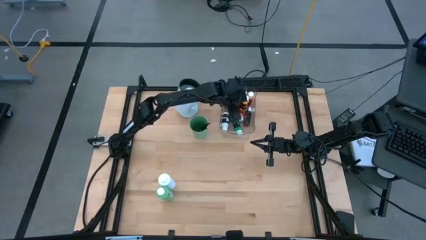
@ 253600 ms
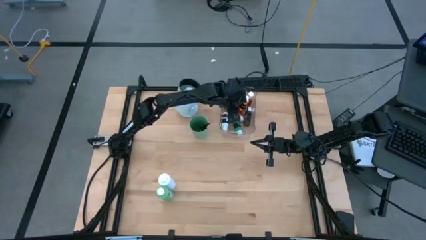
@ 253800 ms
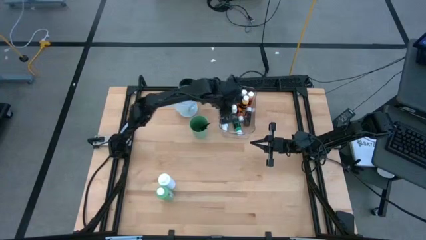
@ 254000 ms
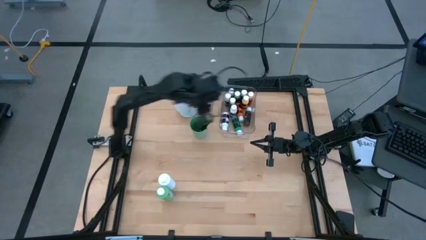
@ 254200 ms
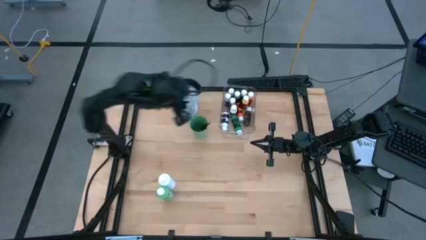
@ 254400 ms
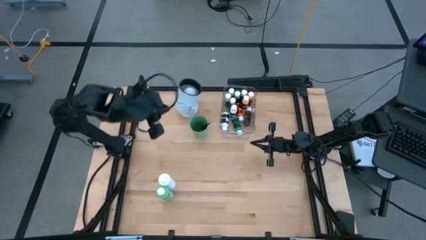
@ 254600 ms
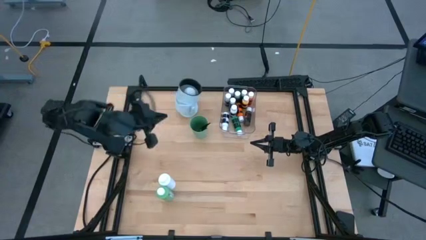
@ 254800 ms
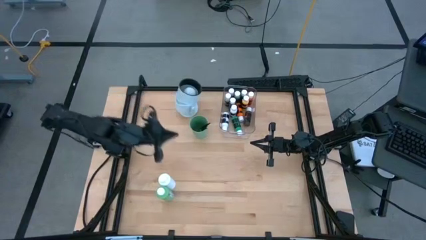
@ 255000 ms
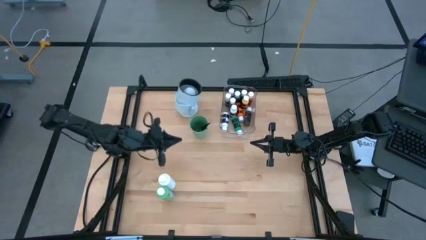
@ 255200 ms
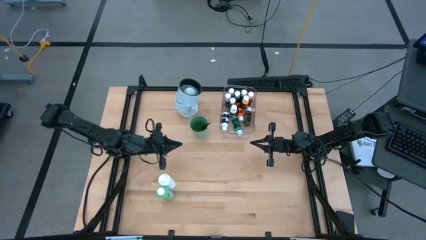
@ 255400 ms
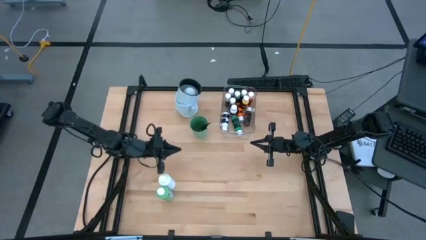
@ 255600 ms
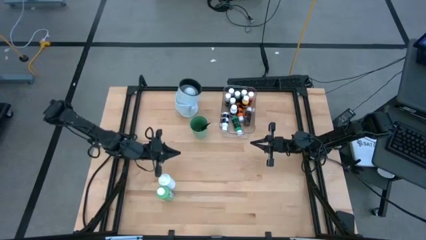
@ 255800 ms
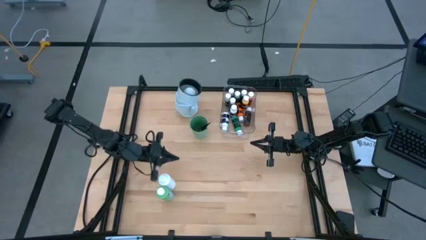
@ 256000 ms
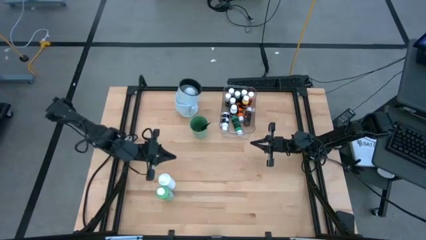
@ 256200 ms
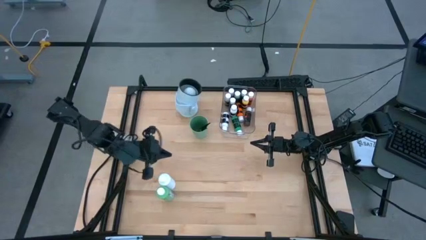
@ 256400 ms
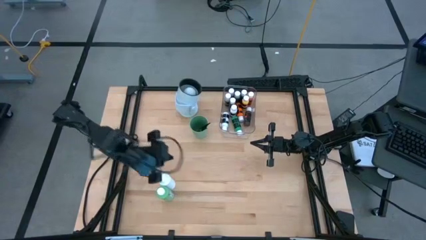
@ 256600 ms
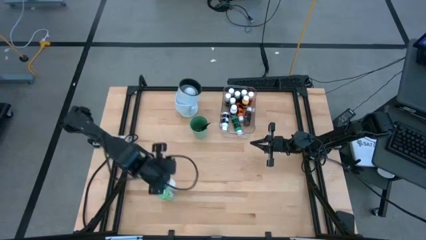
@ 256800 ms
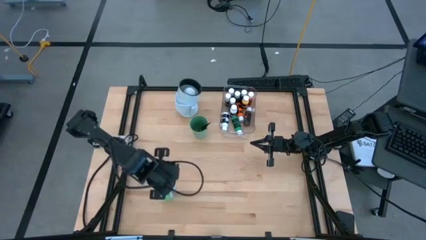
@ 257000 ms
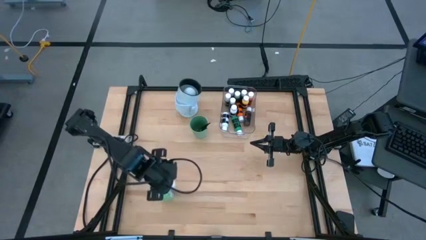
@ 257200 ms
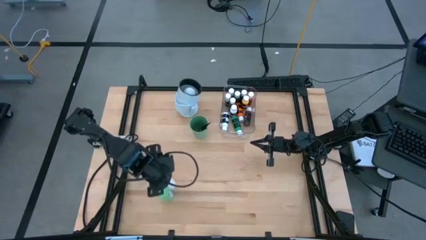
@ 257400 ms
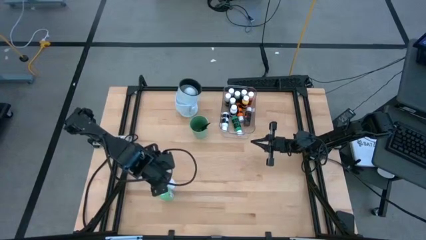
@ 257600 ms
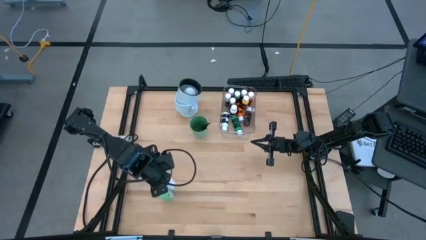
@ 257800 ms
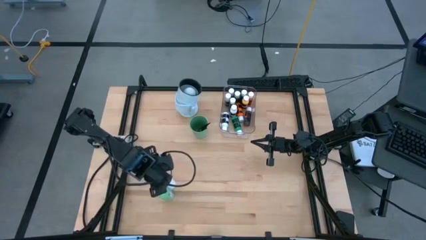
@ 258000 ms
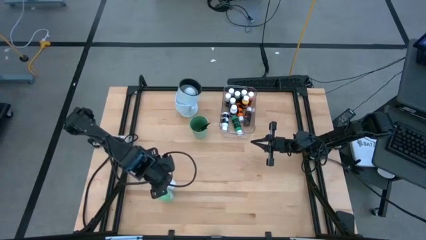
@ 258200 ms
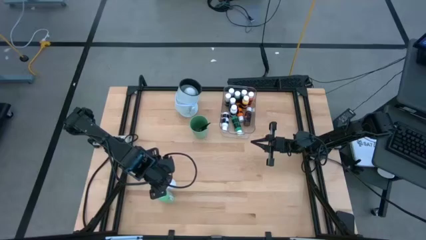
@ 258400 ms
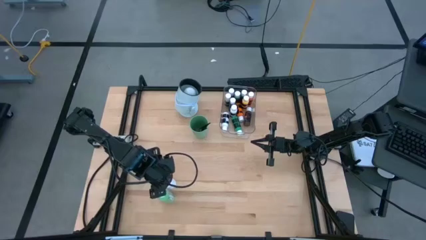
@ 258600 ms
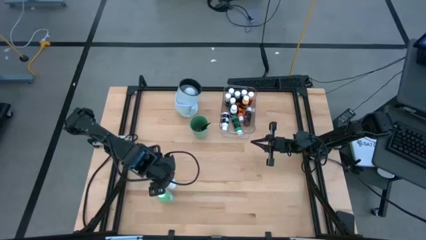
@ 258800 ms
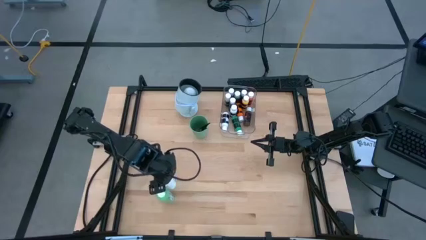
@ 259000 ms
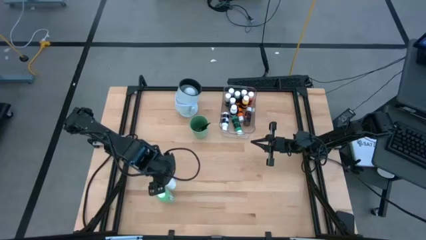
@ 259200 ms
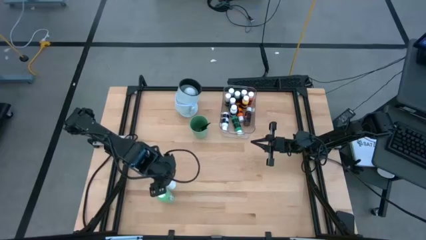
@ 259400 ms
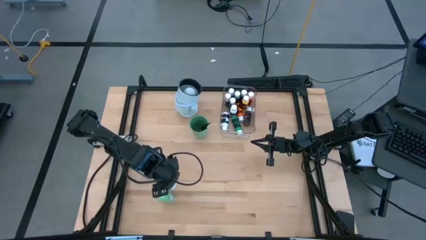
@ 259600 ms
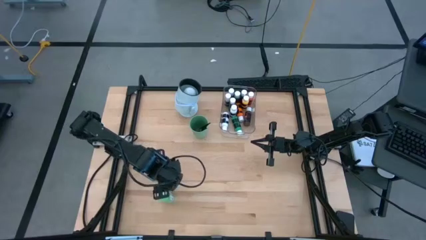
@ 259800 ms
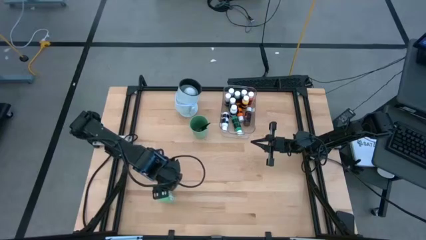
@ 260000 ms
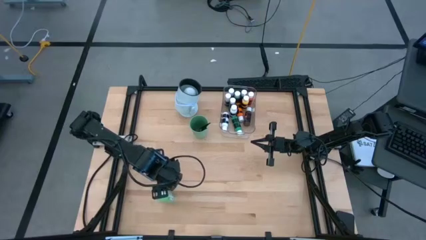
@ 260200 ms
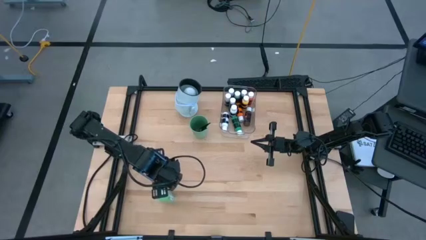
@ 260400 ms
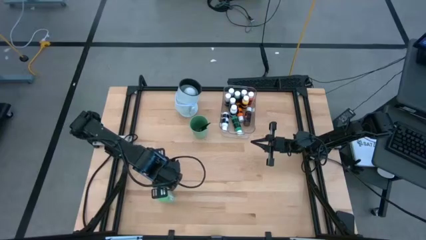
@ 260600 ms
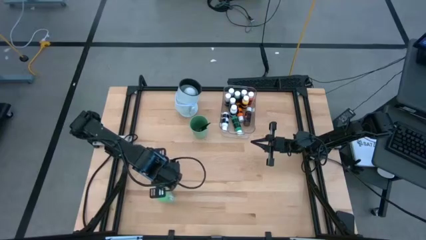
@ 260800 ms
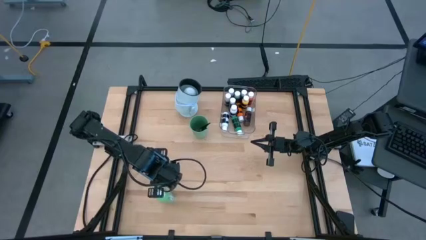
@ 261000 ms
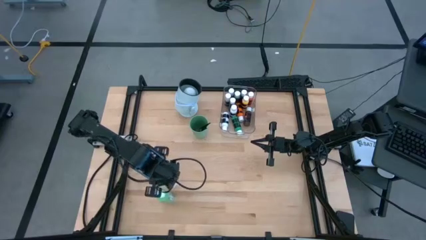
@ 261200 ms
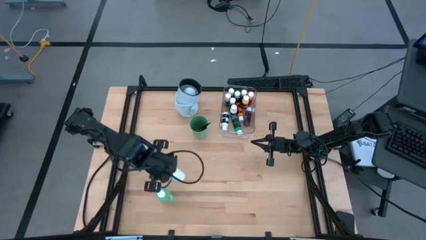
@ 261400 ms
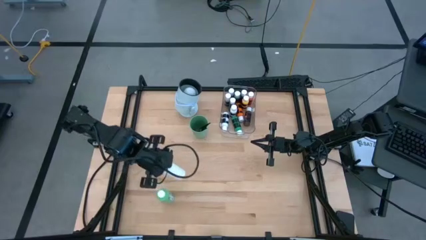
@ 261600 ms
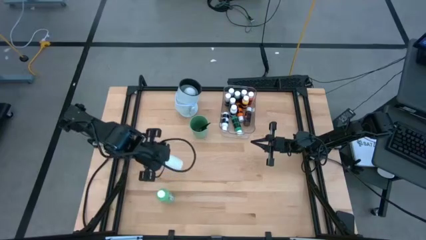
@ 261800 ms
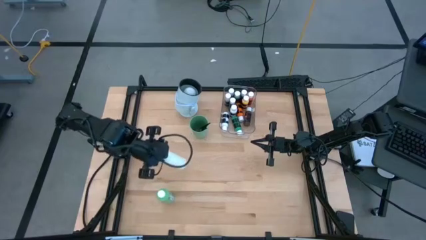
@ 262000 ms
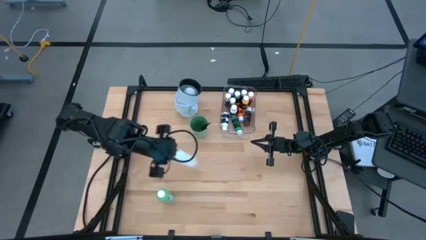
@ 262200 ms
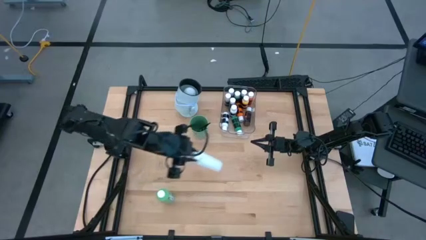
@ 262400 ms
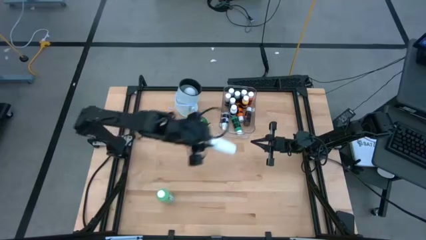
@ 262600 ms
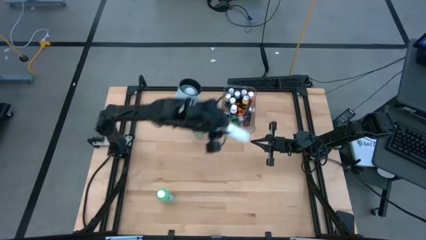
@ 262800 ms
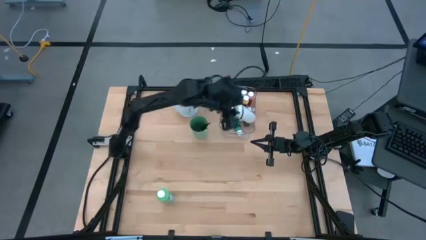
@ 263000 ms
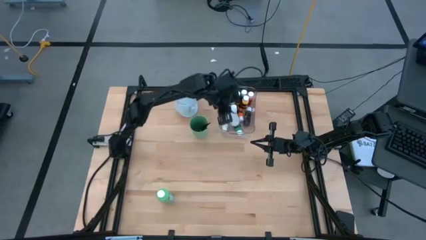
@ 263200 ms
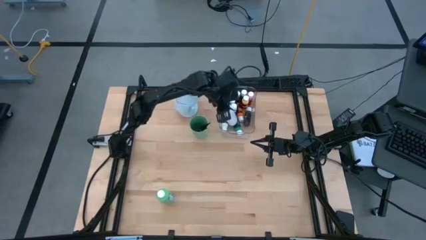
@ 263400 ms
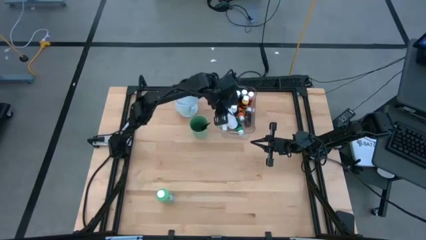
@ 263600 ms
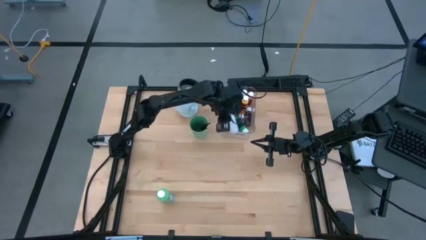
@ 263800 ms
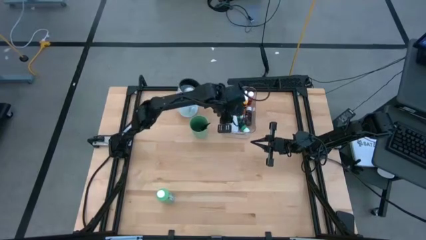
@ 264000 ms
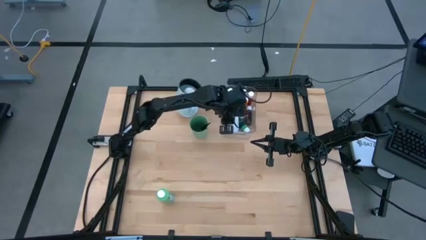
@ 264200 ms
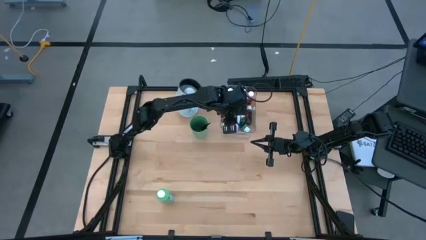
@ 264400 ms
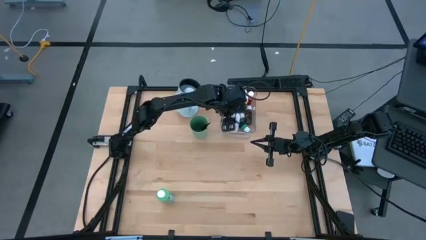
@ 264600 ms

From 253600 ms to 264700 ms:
Task: Pick & Place Paint Supplies
Put the large white paint bottle into the transparent bin
